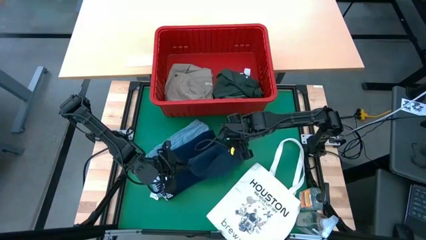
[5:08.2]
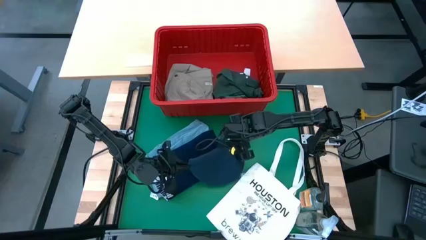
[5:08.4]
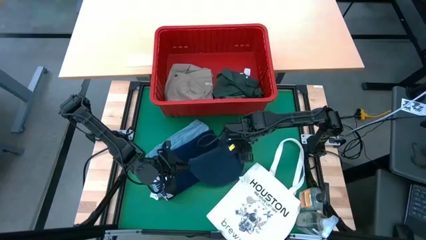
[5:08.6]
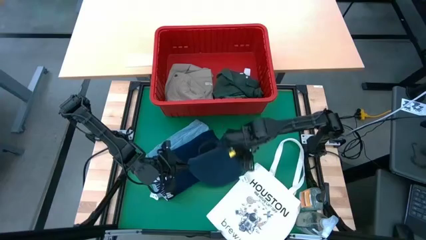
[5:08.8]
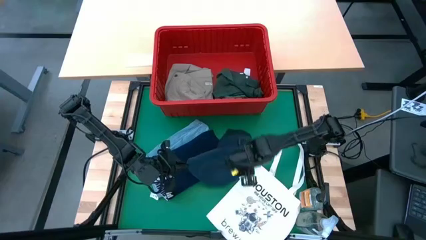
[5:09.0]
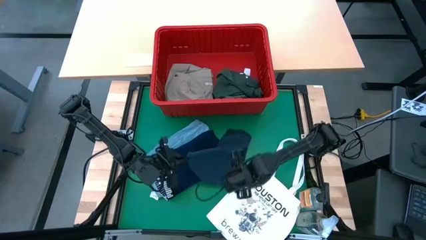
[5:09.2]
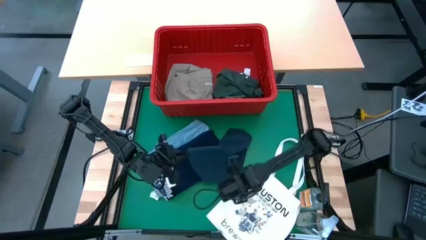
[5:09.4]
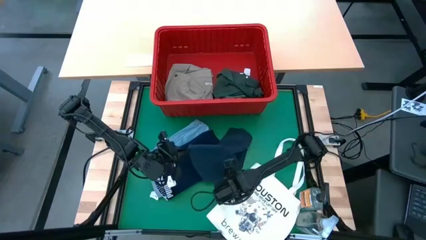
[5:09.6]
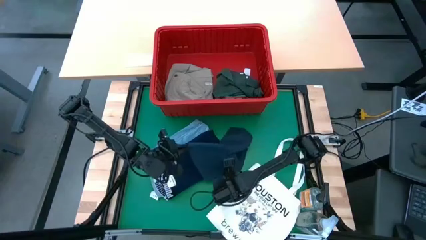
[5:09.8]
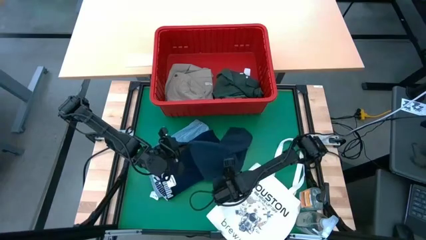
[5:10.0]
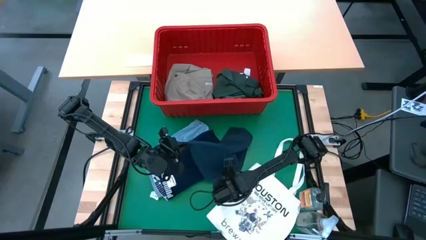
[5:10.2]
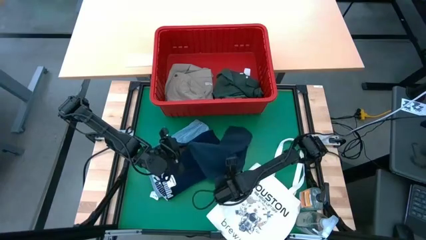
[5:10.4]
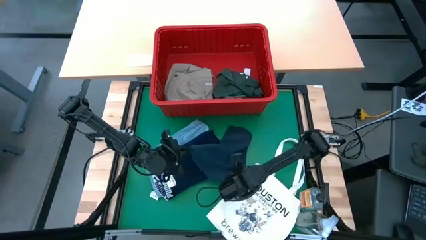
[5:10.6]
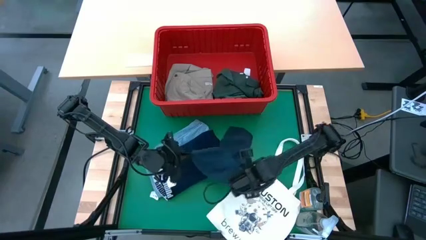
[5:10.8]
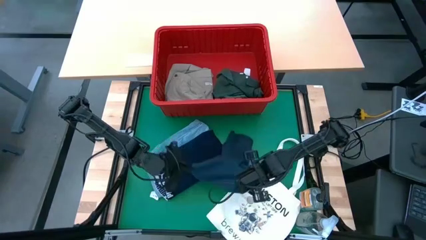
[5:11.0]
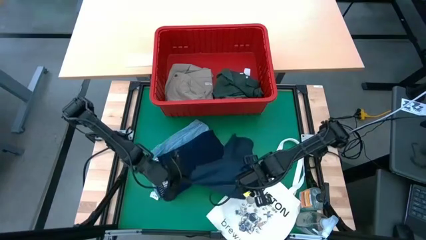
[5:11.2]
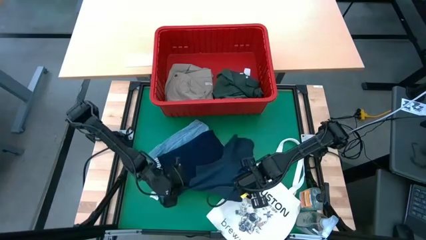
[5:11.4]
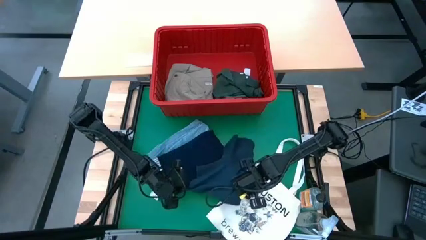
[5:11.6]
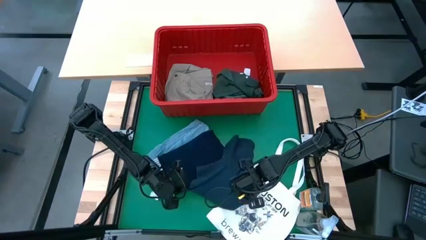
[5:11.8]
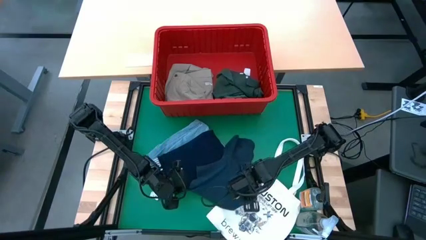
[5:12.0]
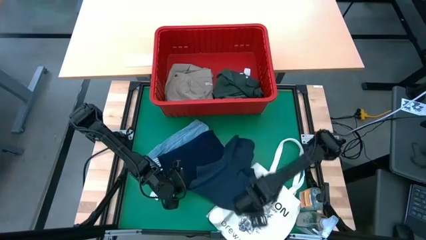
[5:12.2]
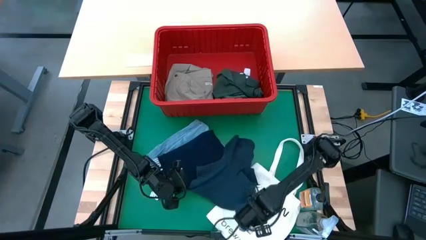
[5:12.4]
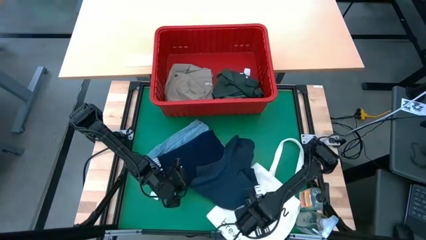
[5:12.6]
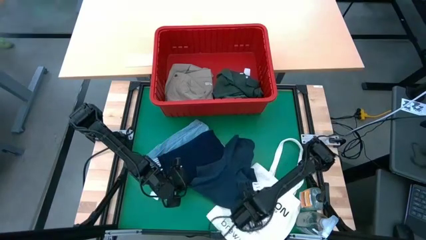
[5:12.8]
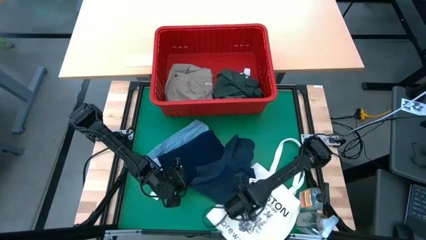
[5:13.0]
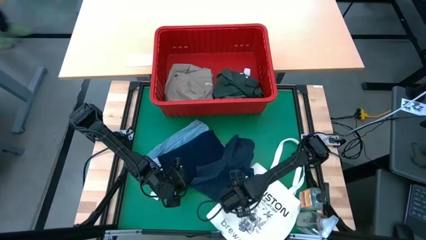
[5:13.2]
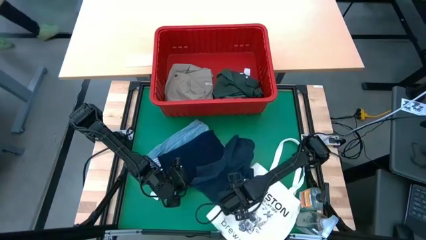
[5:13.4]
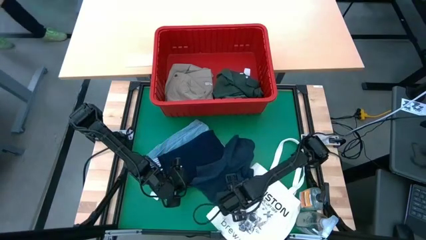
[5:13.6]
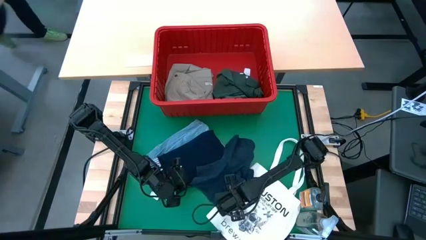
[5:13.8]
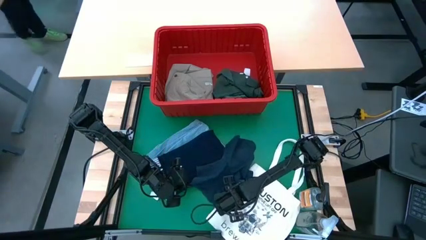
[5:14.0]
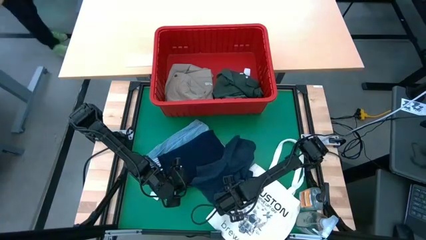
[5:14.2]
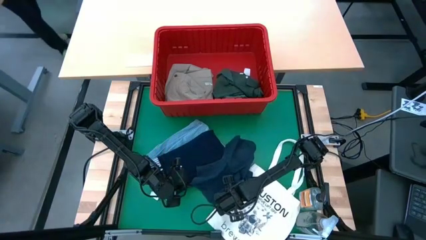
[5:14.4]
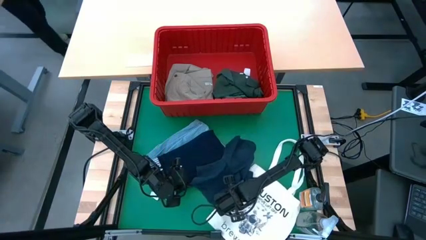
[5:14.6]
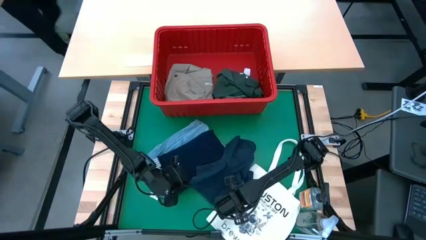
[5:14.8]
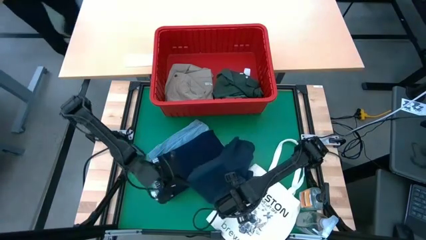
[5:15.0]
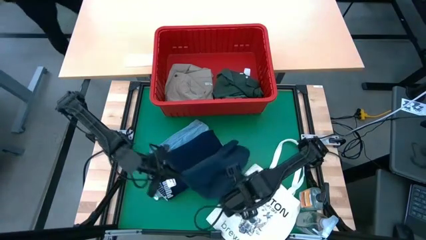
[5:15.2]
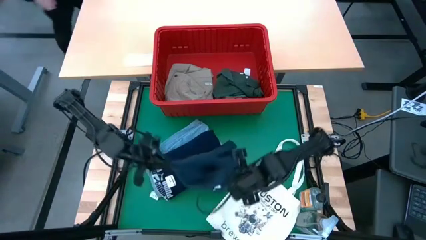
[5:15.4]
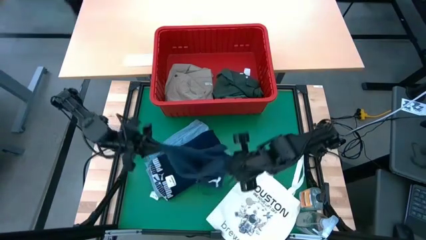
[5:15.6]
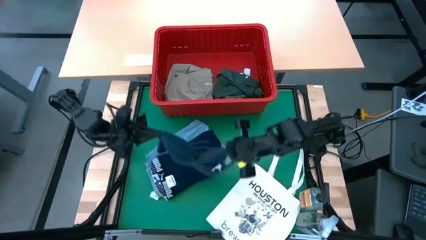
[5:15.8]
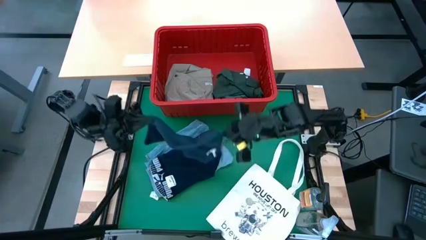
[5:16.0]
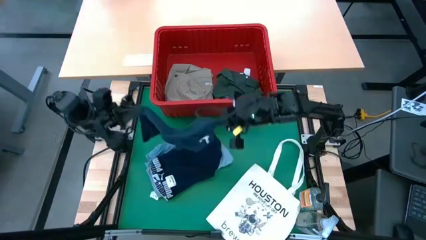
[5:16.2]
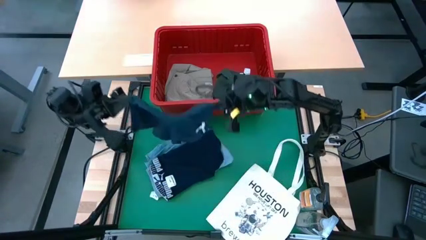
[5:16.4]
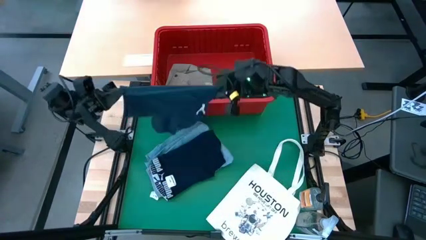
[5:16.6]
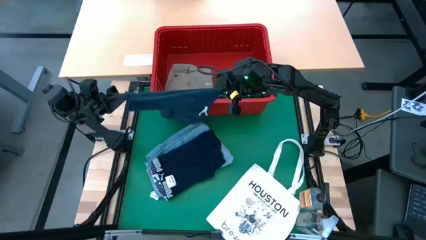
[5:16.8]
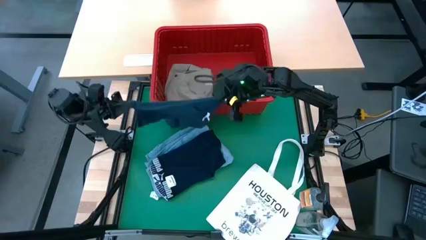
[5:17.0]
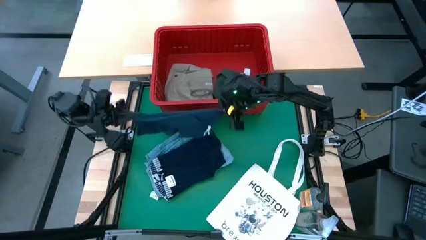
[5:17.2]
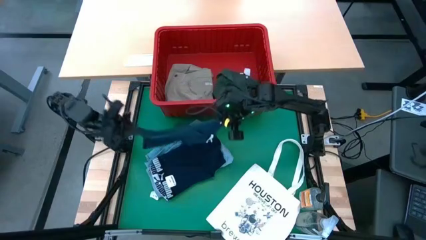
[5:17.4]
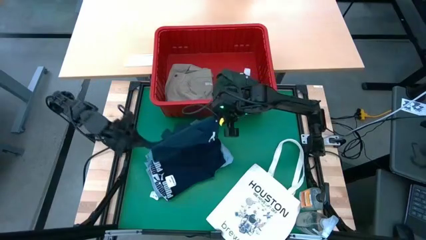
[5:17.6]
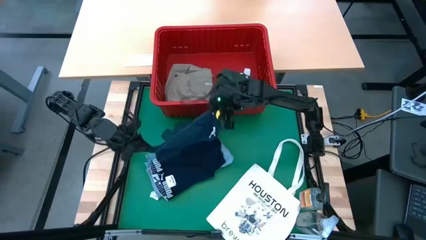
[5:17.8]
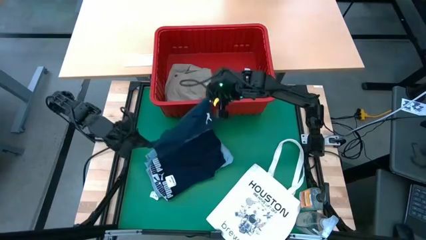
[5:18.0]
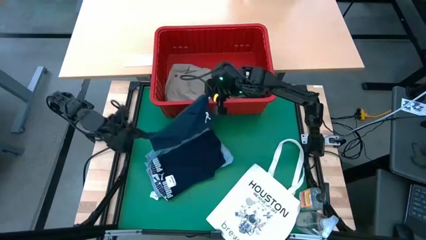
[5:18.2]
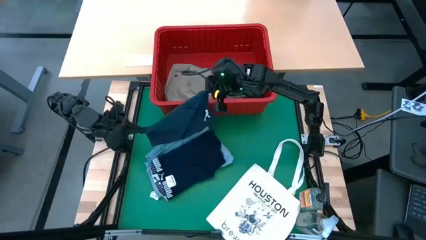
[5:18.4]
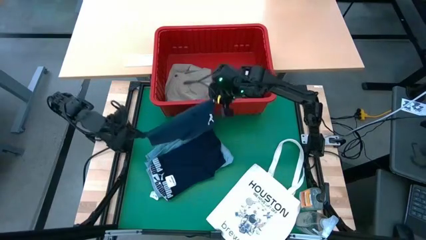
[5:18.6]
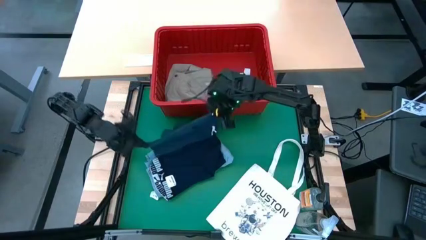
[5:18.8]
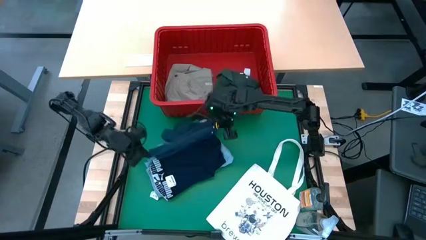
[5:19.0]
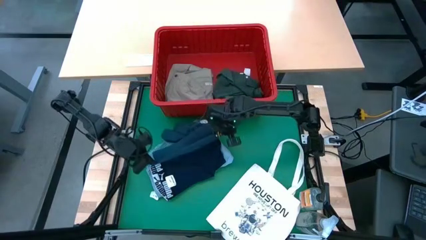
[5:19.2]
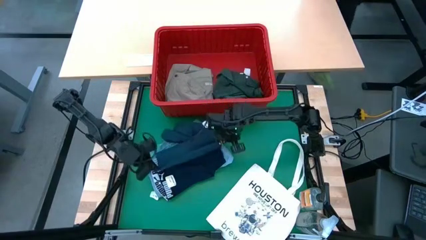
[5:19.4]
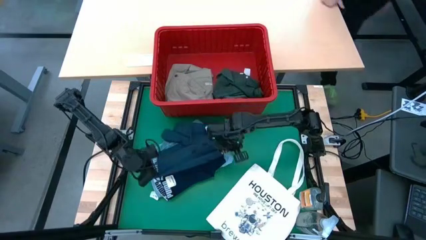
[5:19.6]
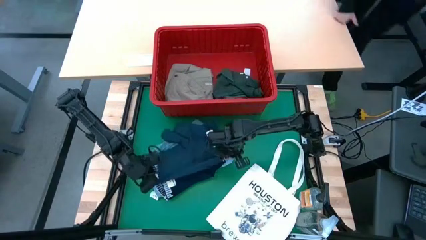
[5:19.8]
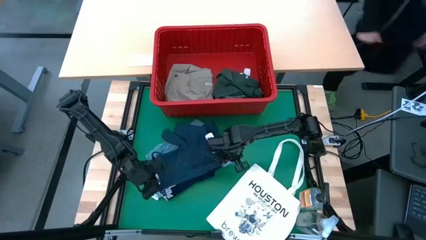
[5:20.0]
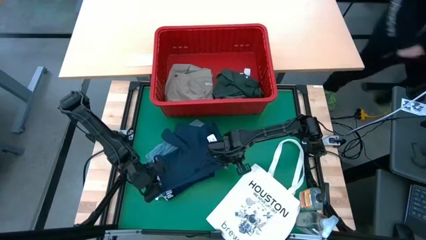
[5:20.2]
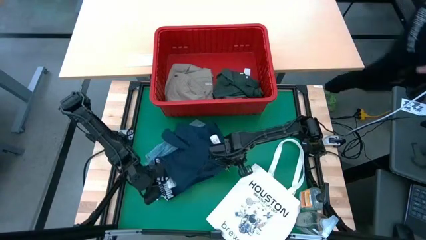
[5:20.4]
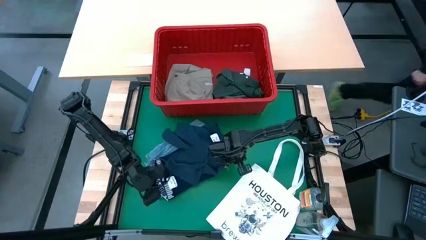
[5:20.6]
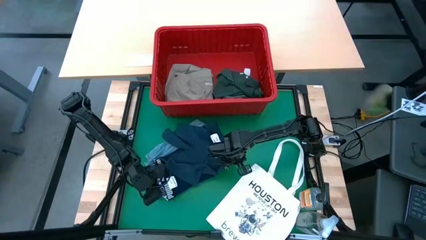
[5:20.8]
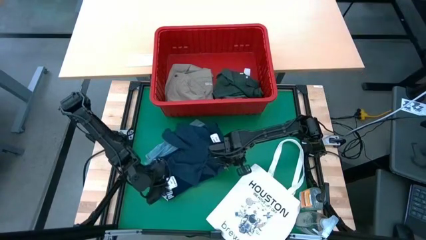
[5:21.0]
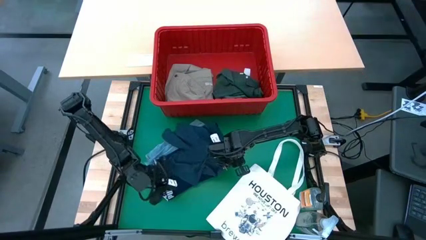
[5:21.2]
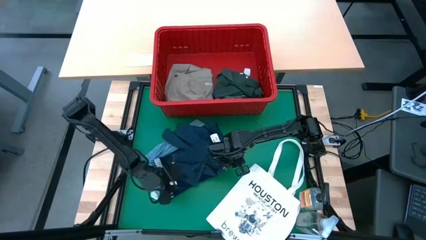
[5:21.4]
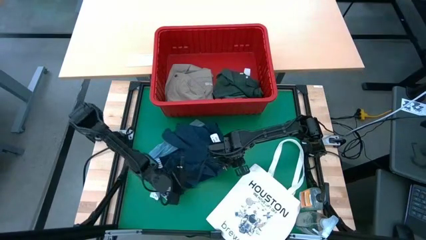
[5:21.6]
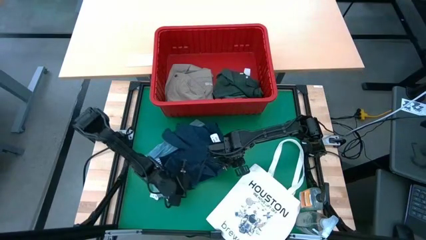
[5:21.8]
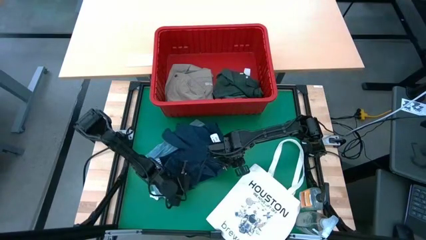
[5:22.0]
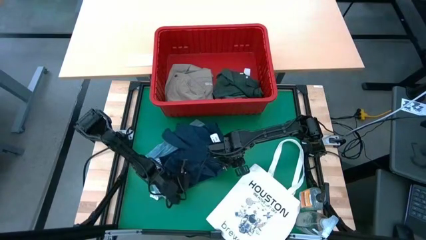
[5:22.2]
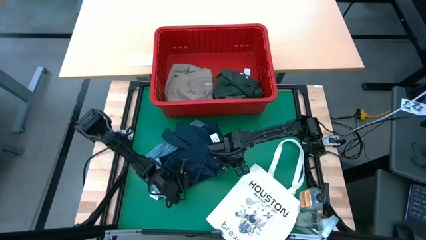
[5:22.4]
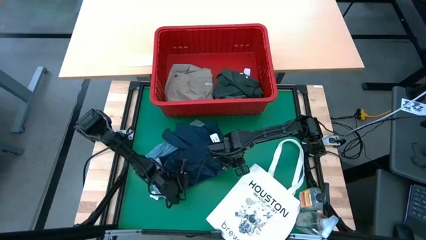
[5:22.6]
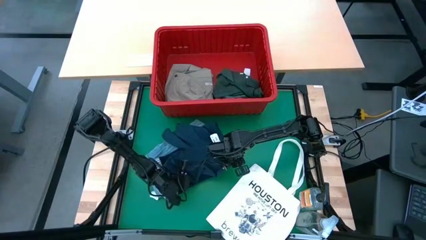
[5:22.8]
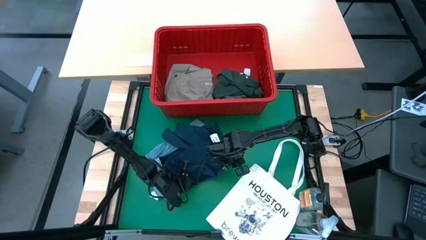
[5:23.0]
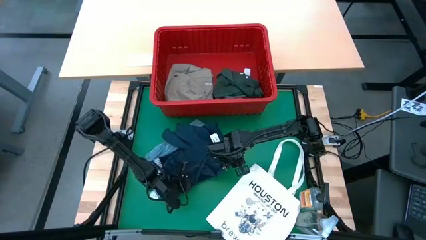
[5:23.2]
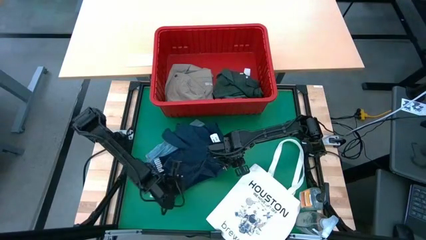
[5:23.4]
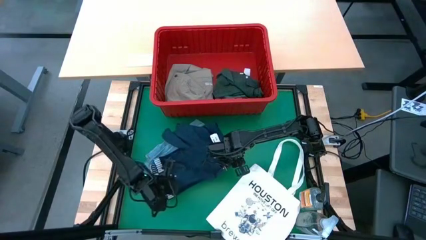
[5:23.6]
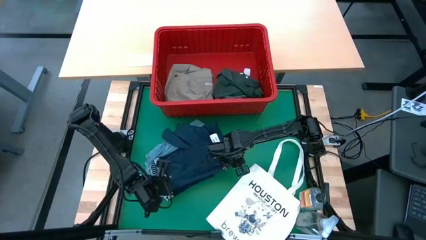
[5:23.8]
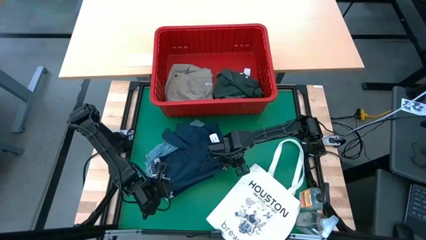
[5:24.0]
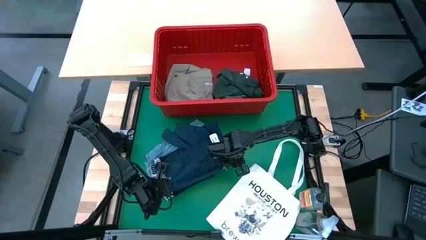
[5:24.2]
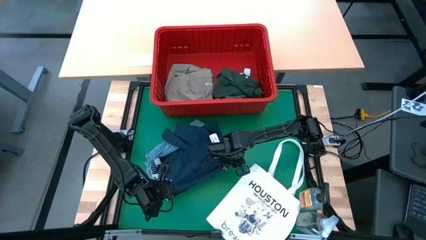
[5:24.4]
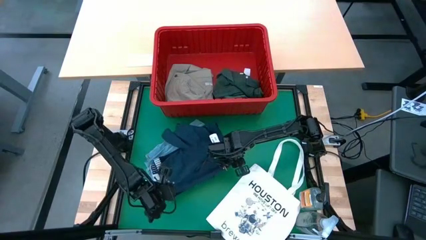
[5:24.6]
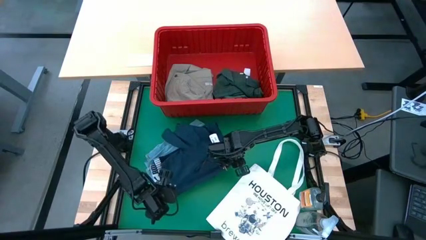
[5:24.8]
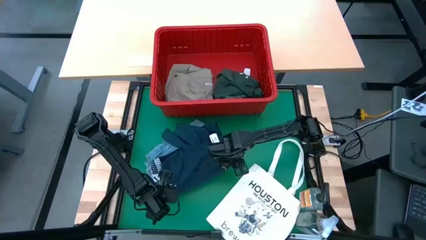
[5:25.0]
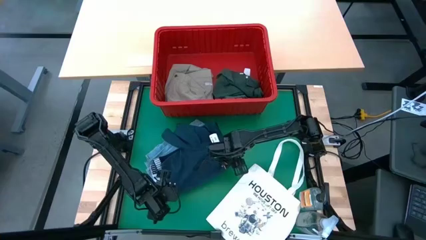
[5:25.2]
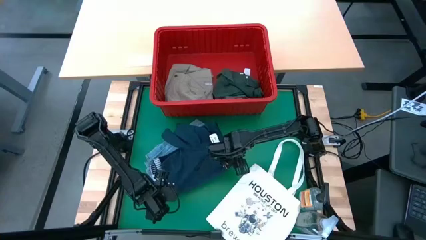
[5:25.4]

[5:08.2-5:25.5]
Task: Fold Laundry from Bin
Stack the gray shorts on top of the dark blue boxer shorts
